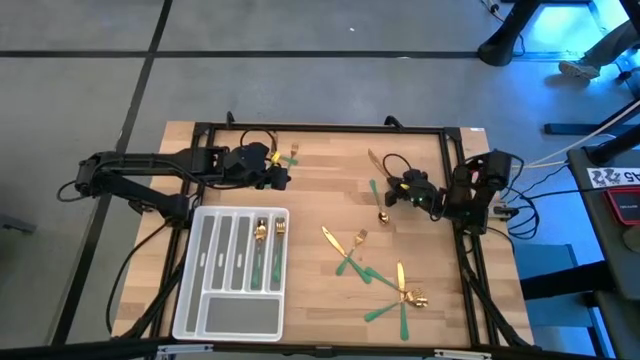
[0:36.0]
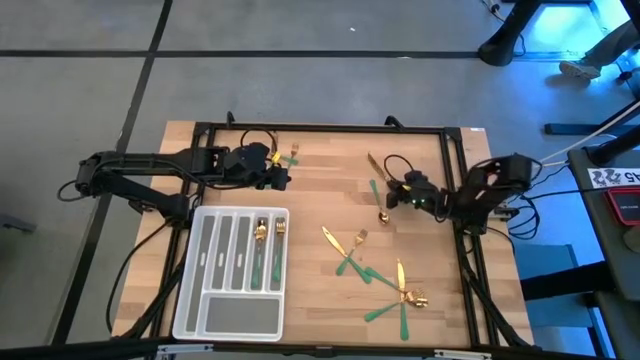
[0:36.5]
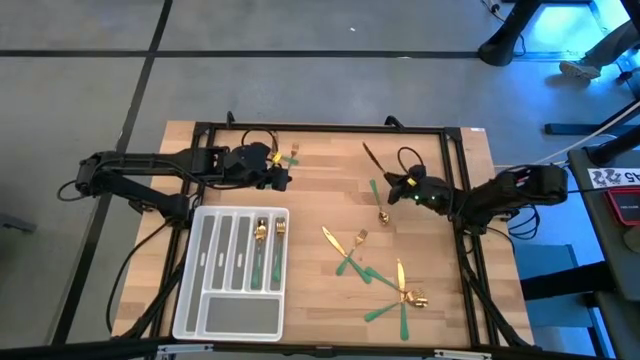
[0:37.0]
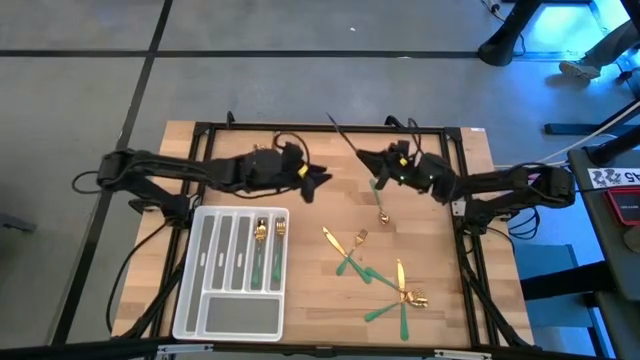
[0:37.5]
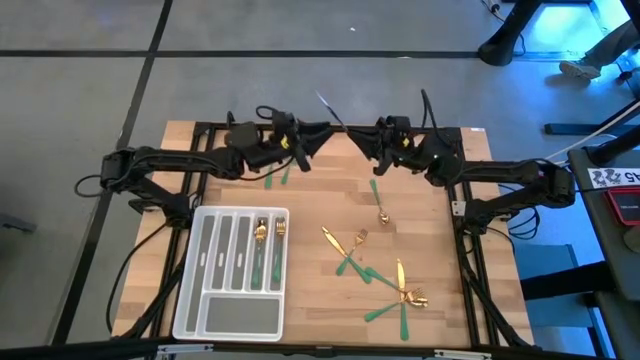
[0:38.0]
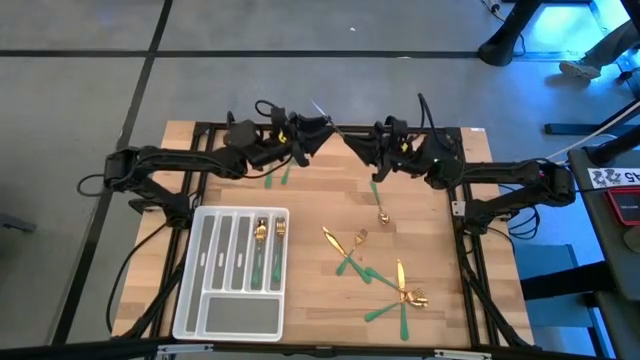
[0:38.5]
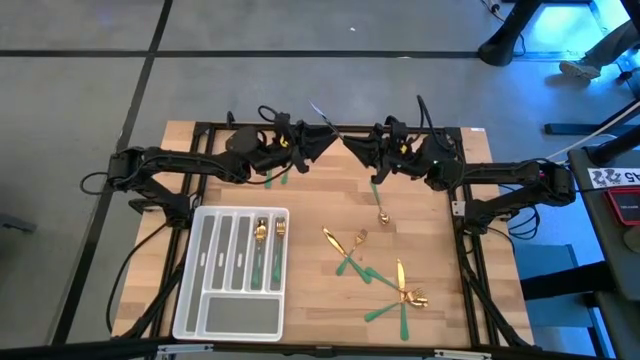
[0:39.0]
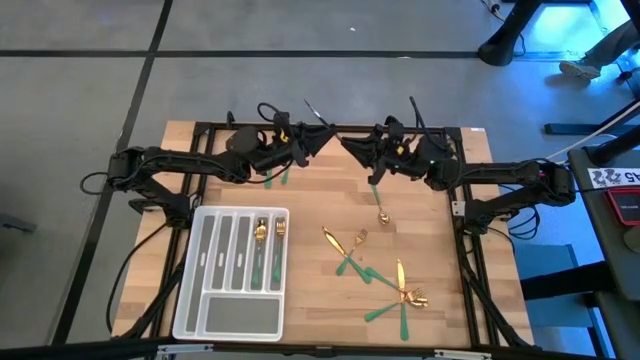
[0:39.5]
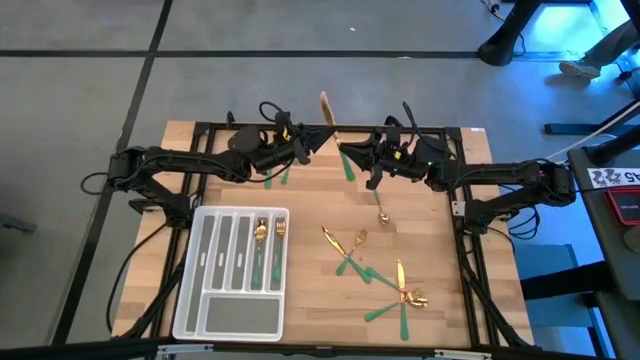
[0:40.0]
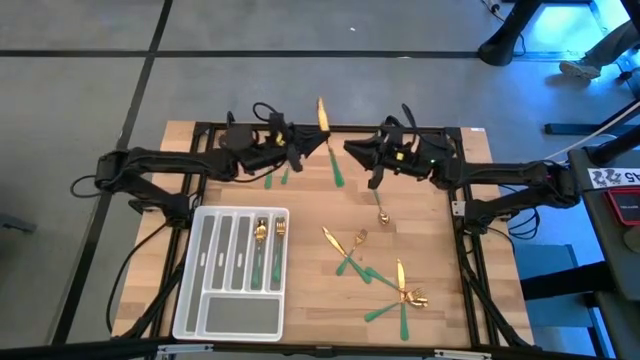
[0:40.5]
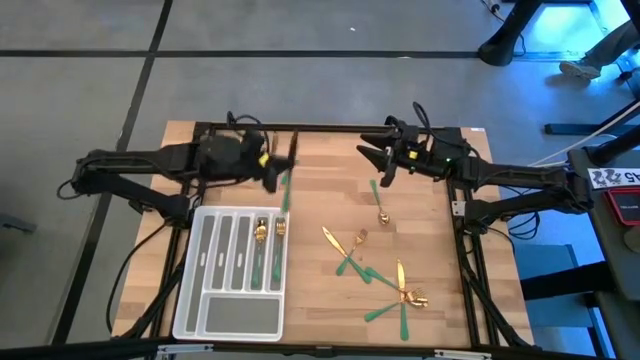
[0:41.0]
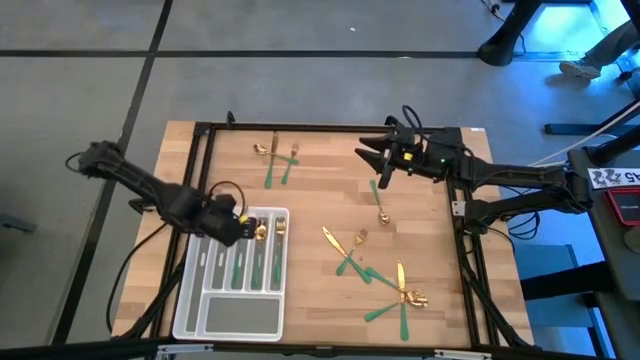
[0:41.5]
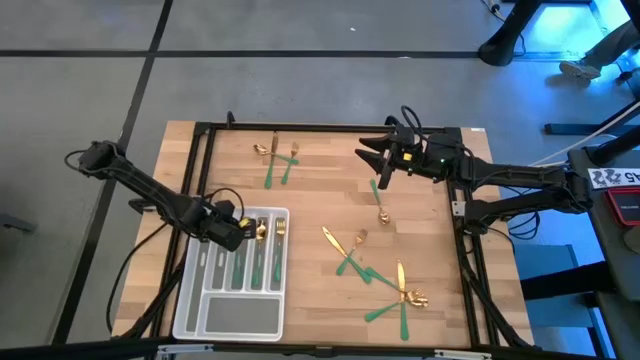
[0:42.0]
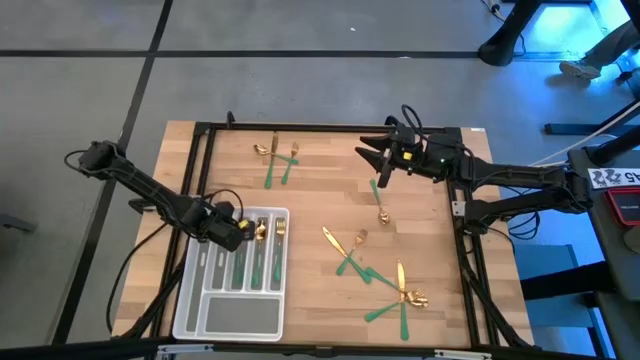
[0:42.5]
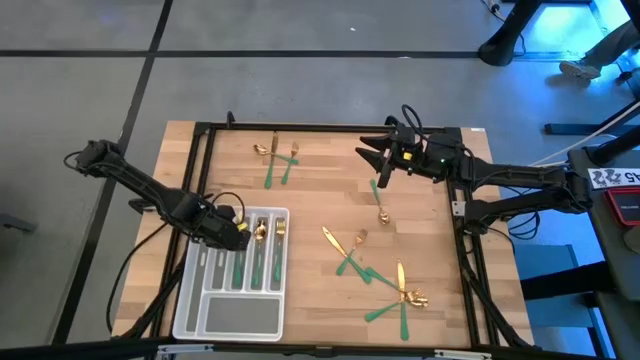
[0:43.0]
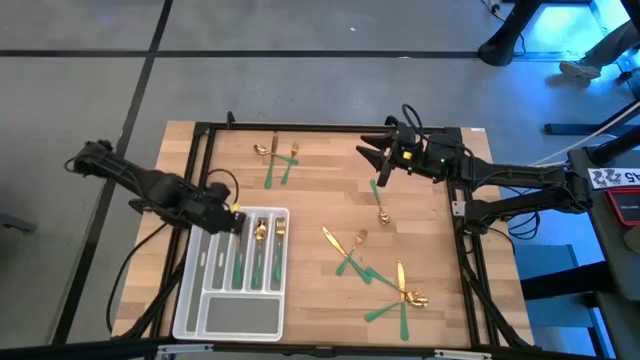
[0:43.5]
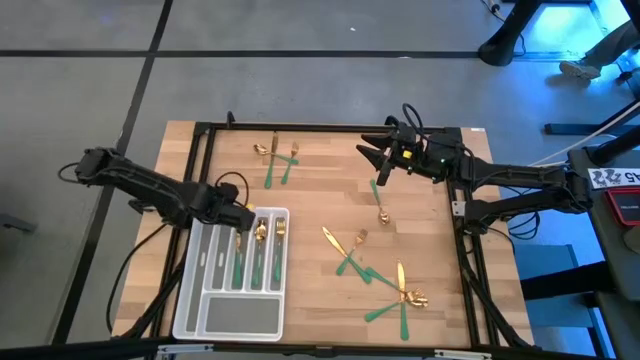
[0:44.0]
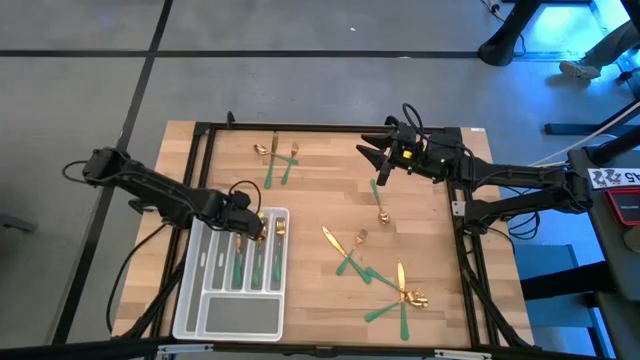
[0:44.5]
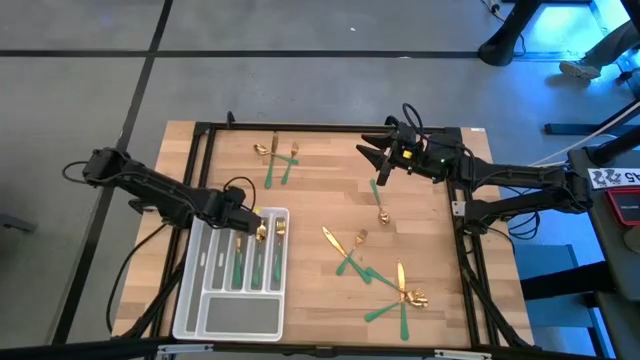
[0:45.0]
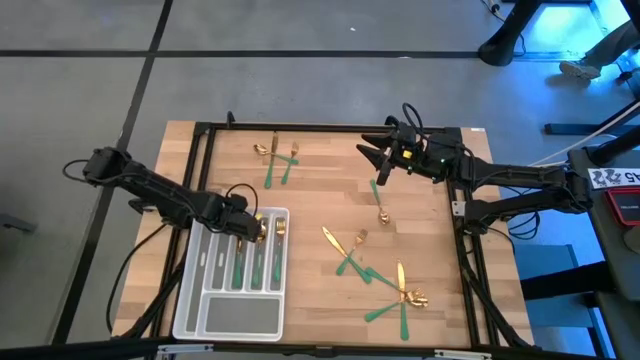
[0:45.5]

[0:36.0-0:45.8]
Task: Sort silverware
Put the knife into the silverware tray

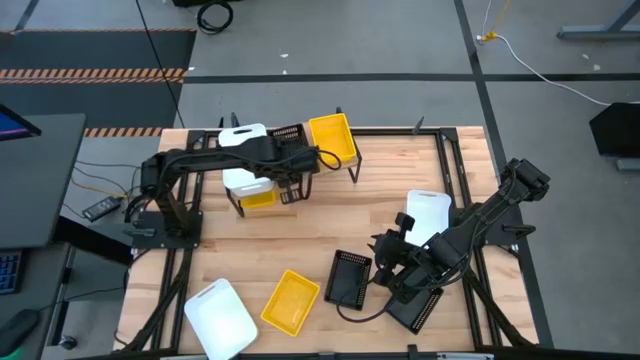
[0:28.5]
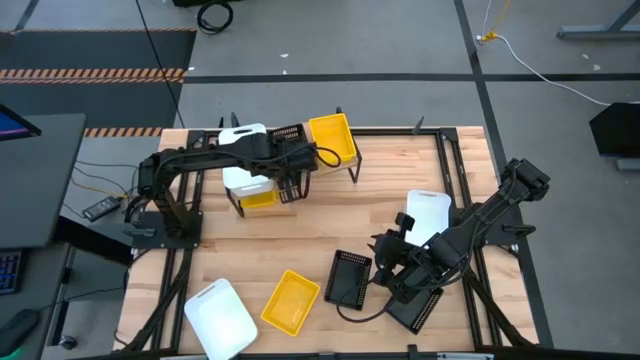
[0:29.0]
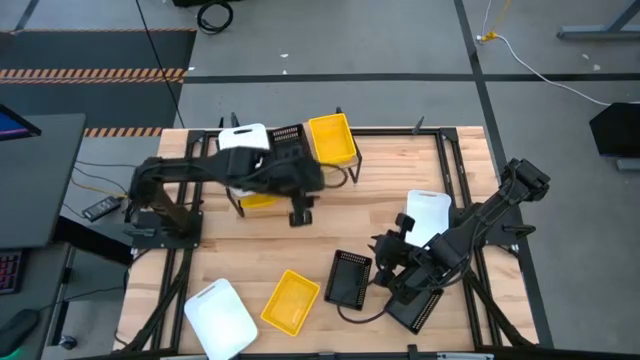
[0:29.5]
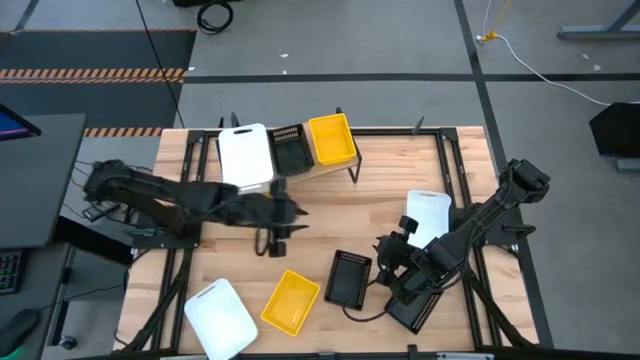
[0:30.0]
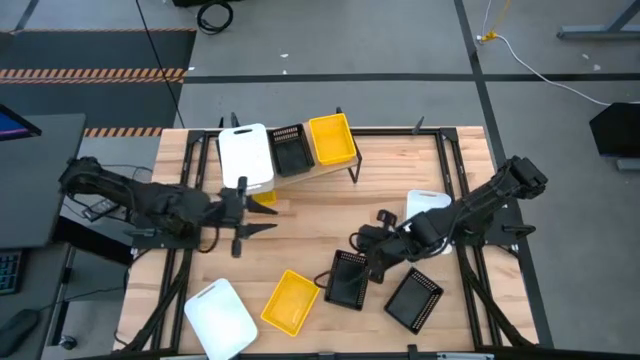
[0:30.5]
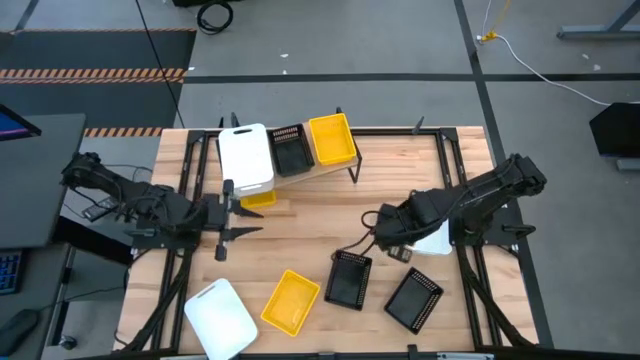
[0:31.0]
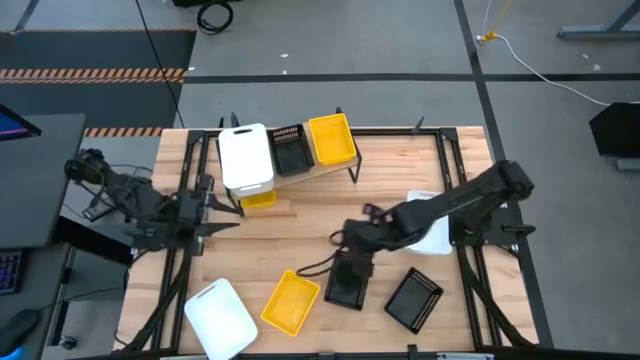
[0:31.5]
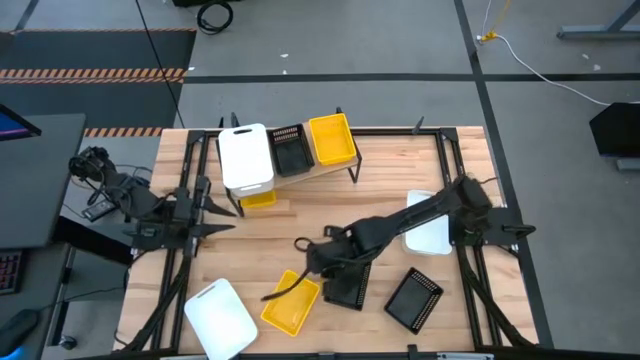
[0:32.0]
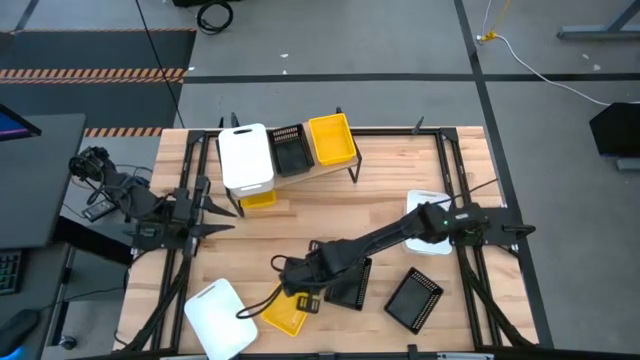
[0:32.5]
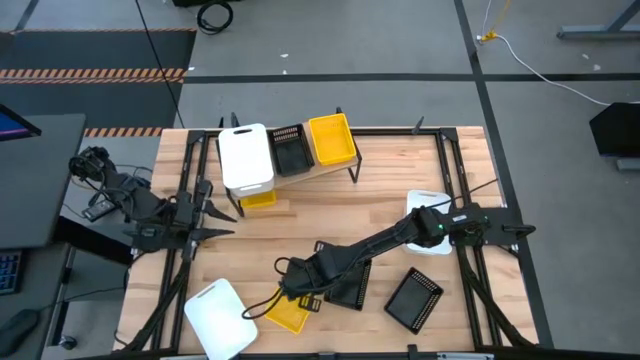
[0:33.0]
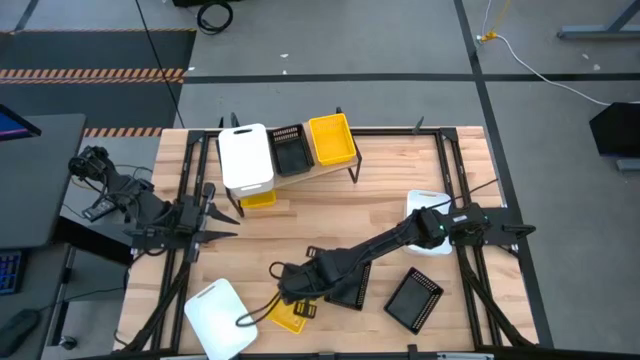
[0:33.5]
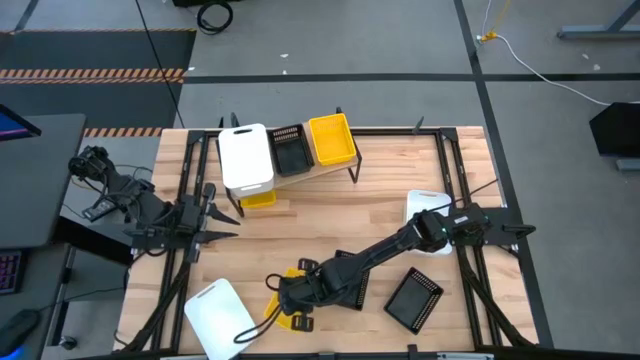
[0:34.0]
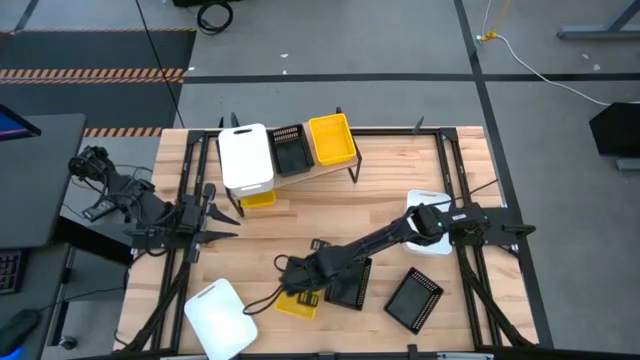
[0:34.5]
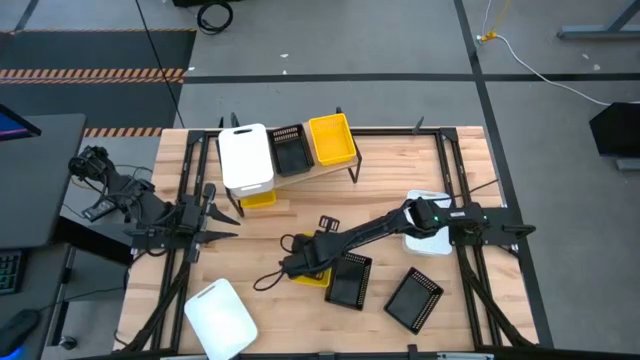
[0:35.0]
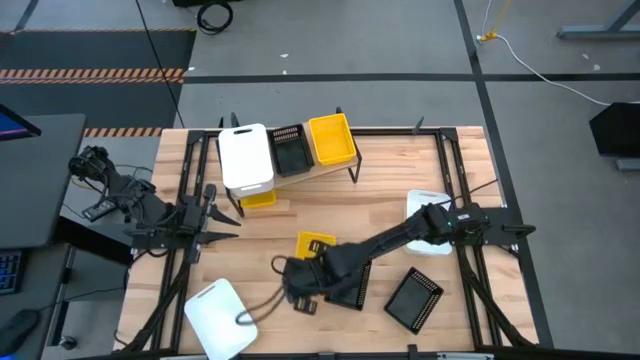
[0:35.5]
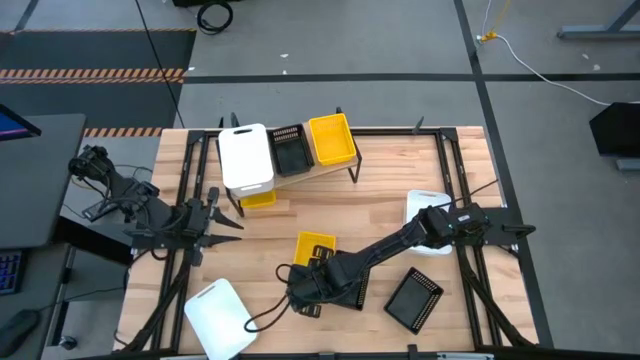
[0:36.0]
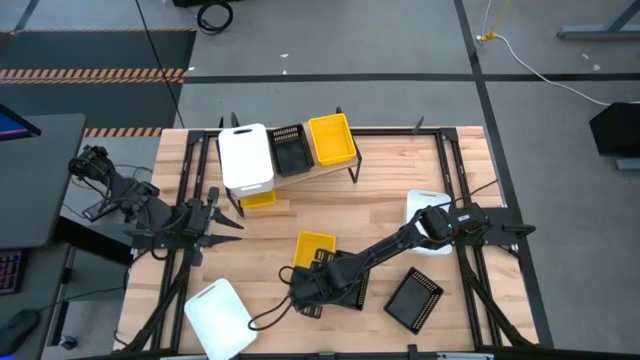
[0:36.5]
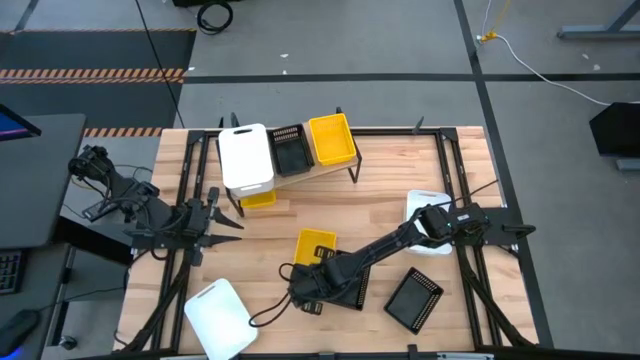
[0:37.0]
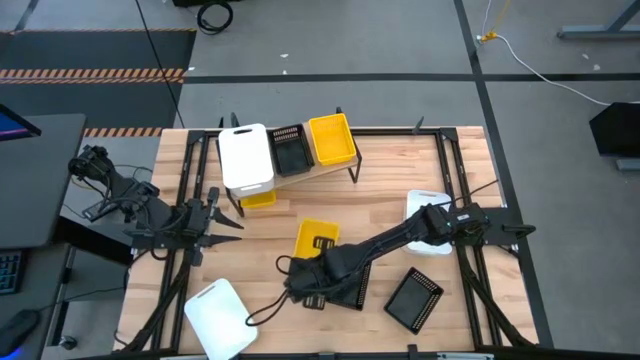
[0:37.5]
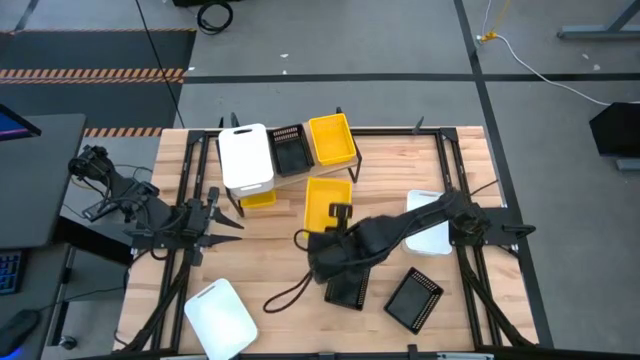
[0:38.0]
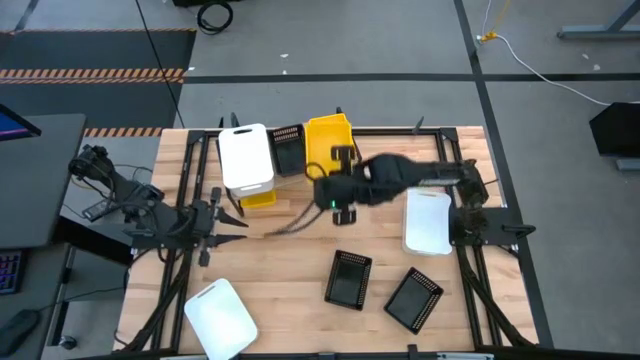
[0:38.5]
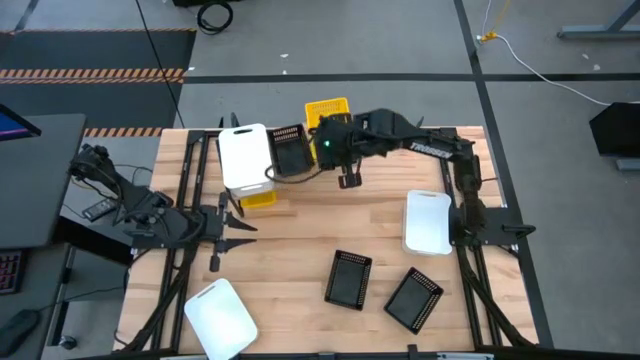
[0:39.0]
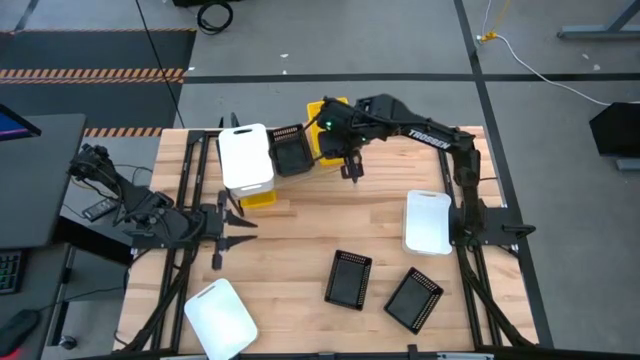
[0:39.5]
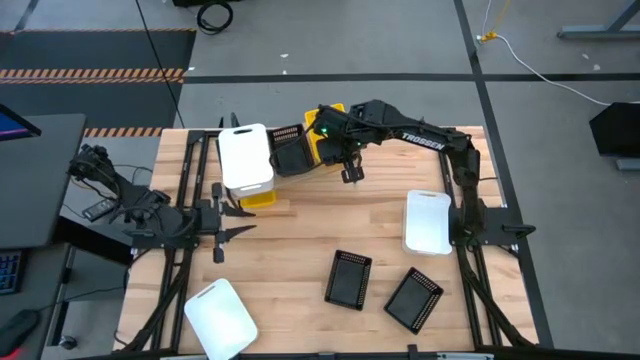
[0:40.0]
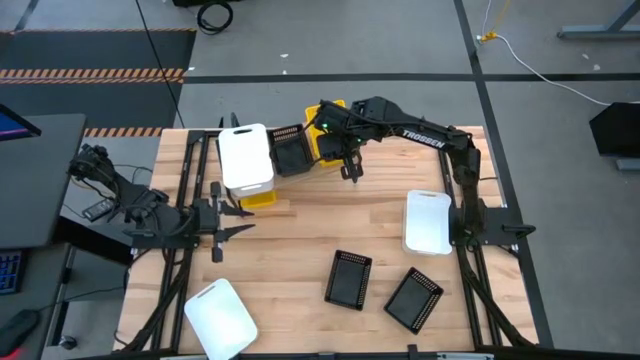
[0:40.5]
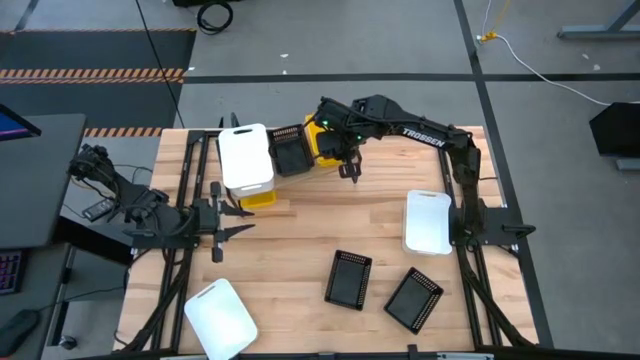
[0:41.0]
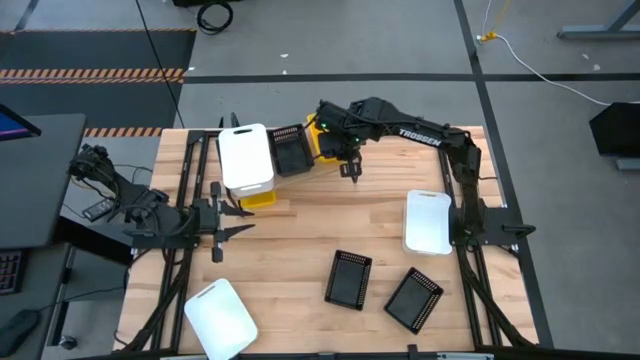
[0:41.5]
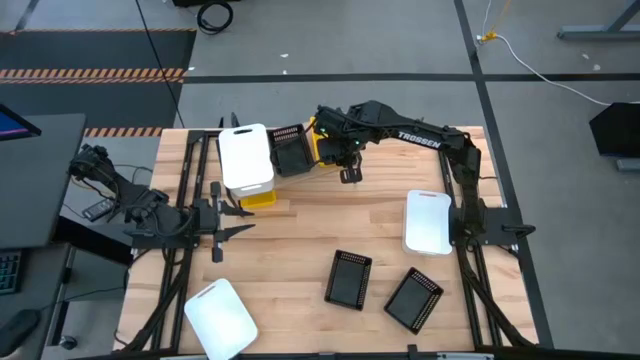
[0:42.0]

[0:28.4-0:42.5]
Task: Stack baskets on shelf by color
Stack the bottom yellow bin on top of the other yellow bin on the shelf
